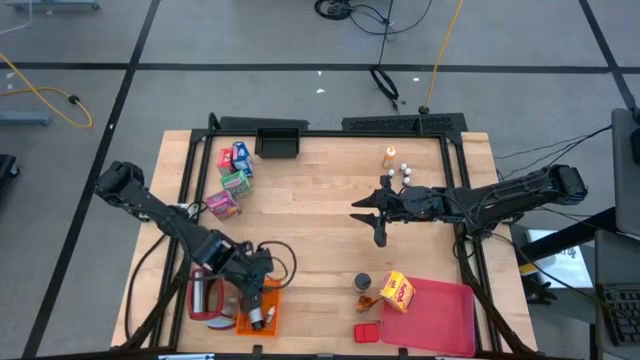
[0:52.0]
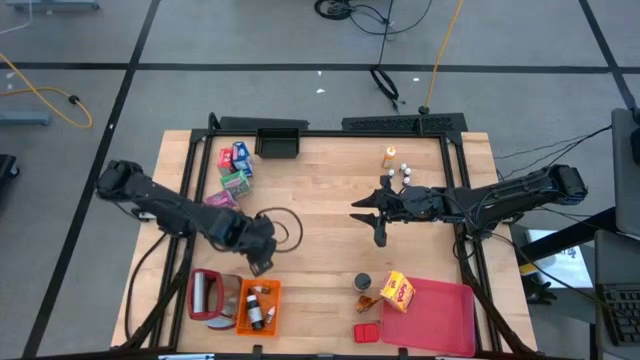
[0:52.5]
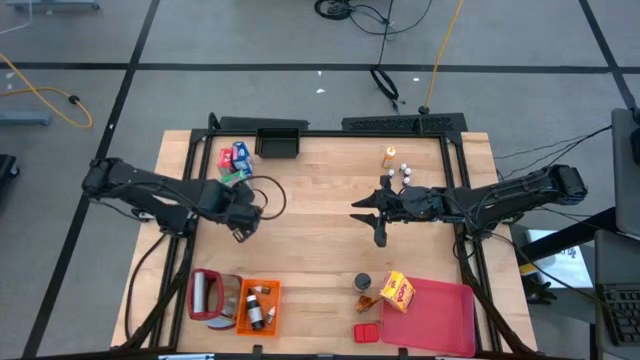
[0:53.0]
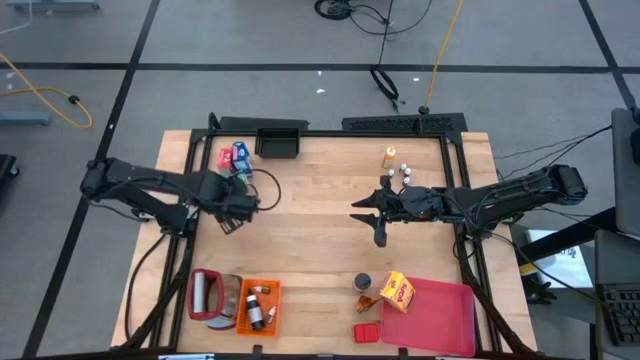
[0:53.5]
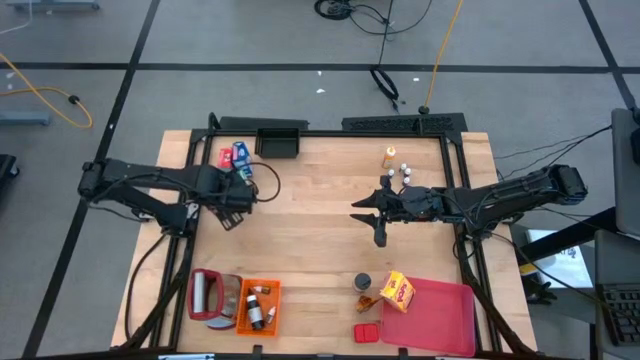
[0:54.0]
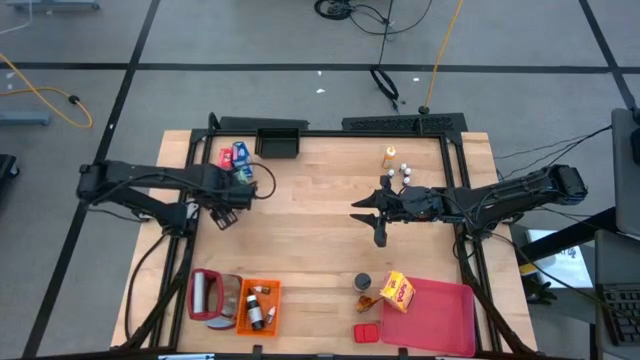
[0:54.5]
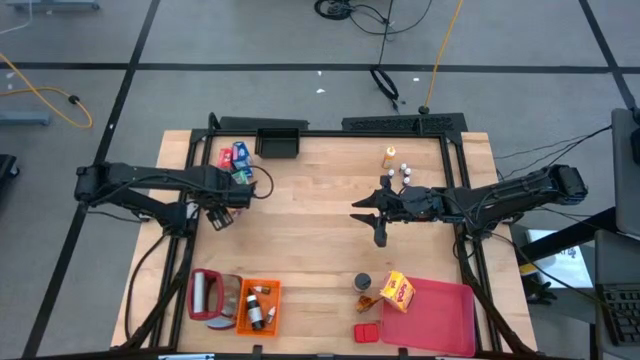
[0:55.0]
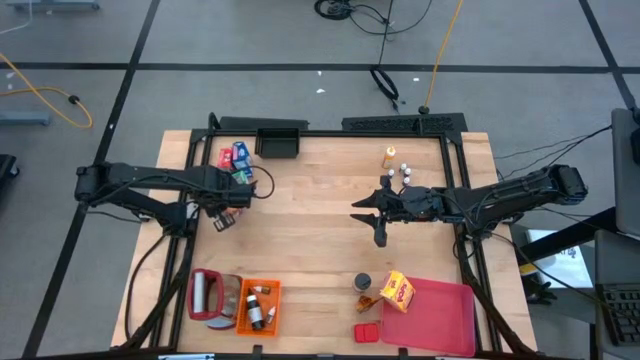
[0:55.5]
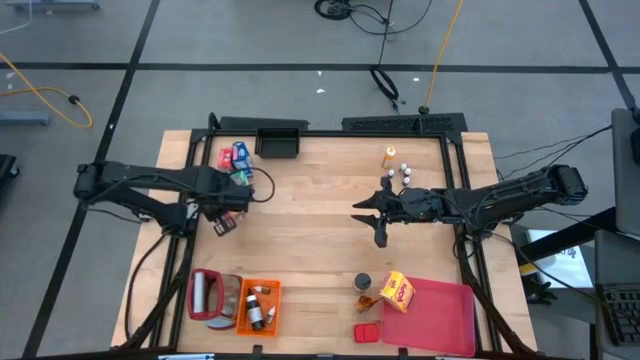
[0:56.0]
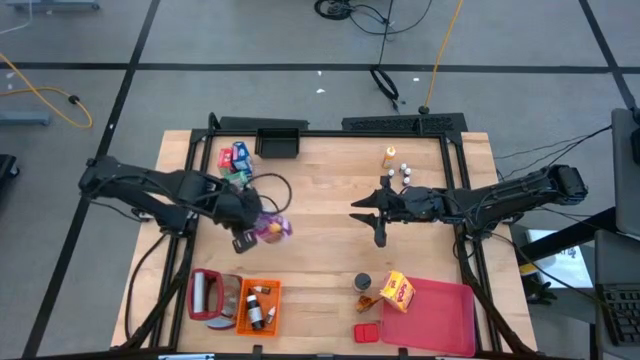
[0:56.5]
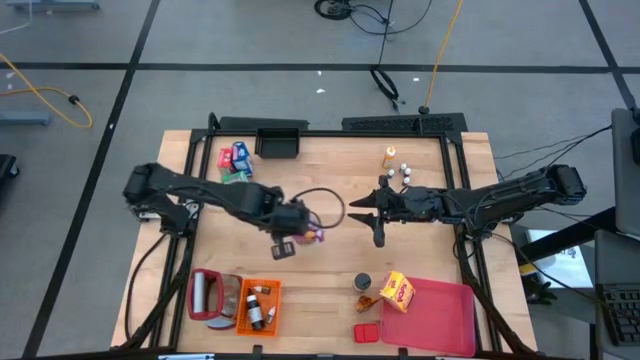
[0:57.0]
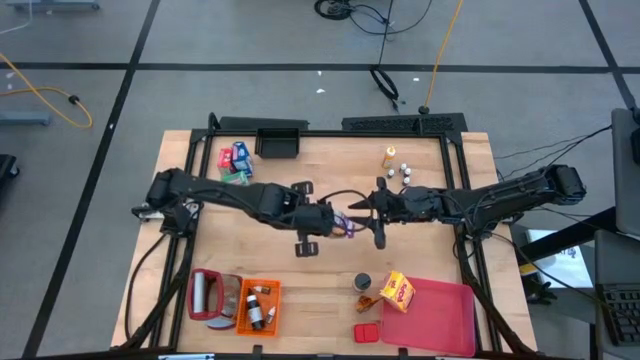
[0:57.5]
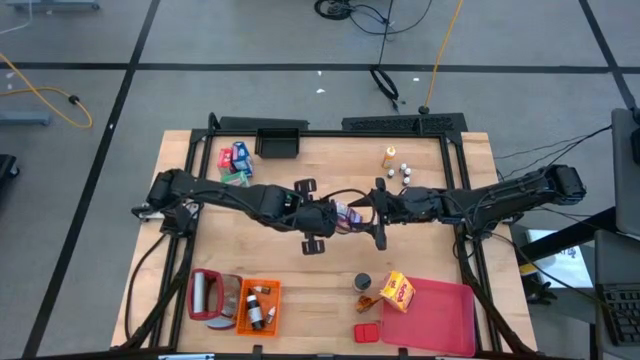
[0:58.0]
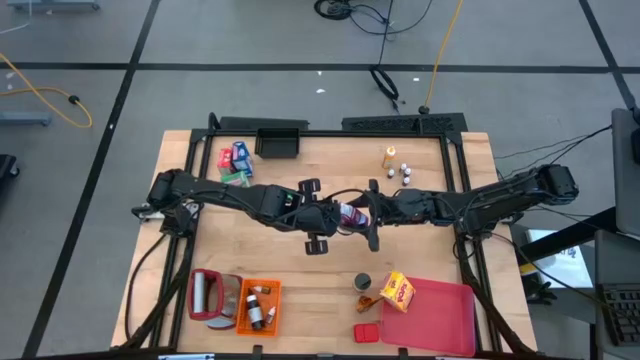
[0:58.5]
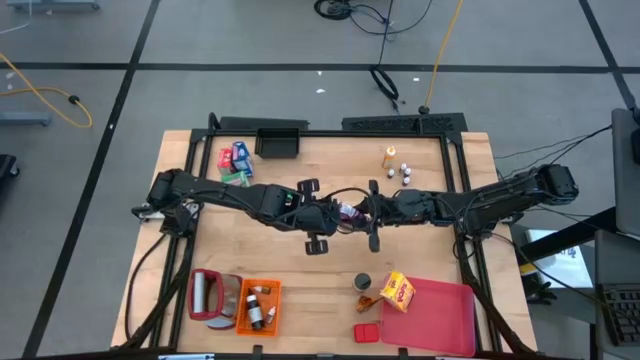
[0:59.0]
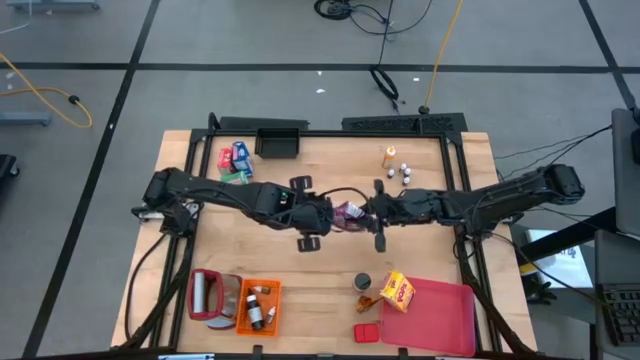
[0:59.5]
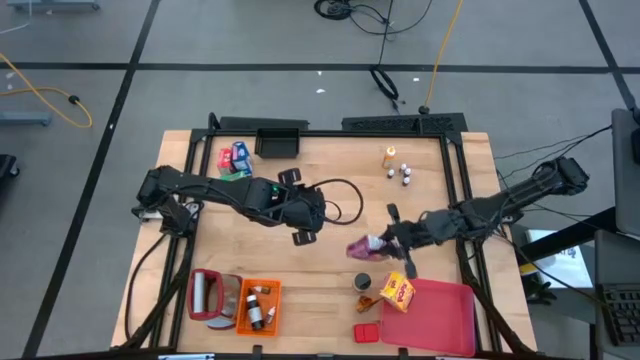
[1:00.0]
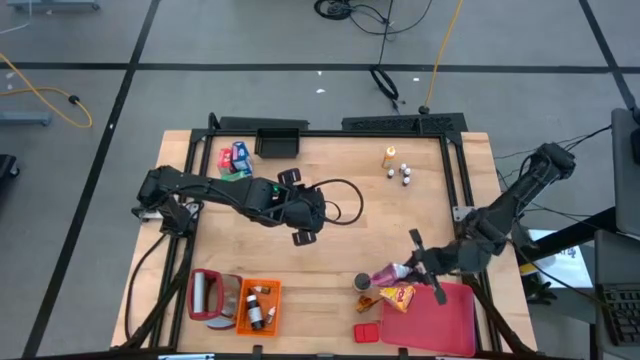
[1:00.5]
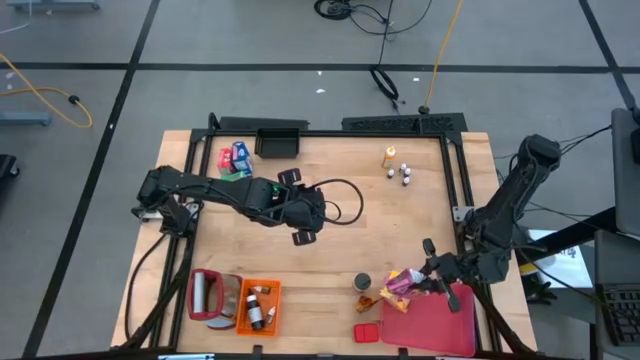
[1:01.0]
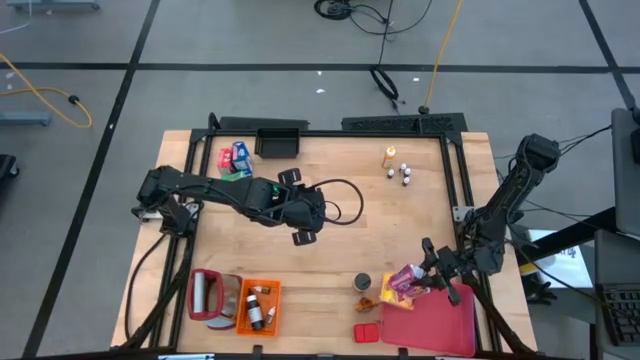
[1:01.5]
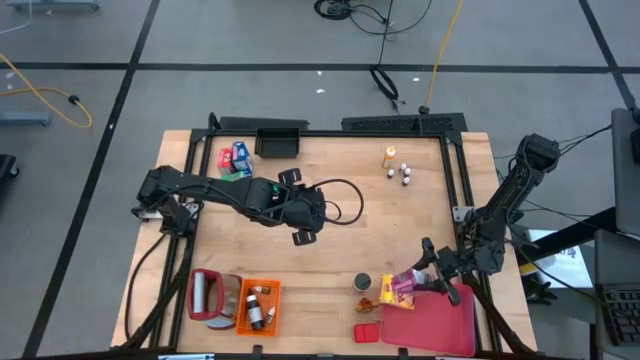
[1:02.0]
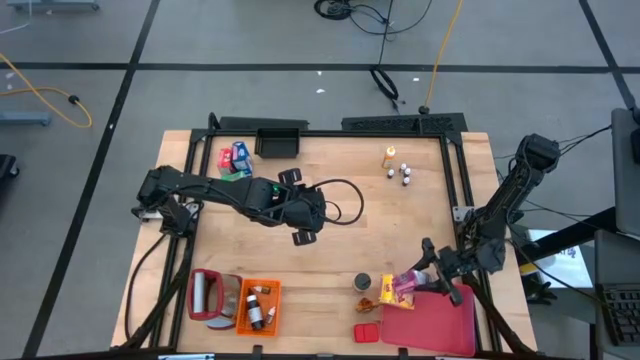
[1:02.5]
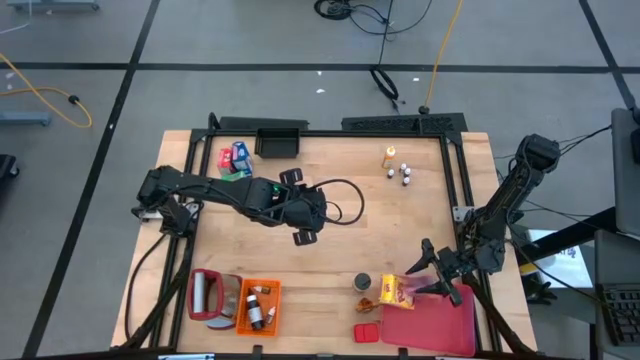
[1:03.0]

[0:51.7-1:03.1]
Task: Pick & Place Kitchen Items
Put the purple cereal box into the red bin

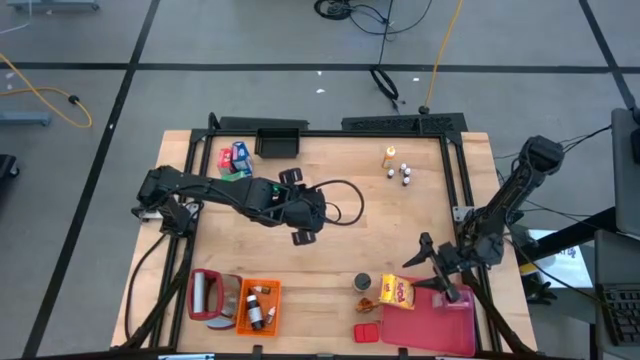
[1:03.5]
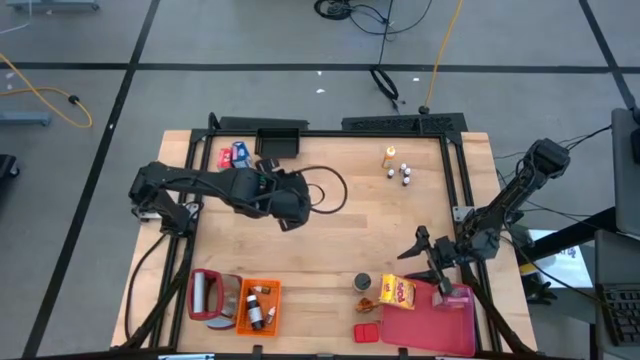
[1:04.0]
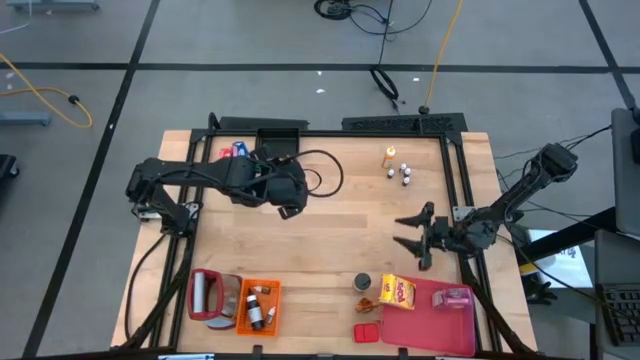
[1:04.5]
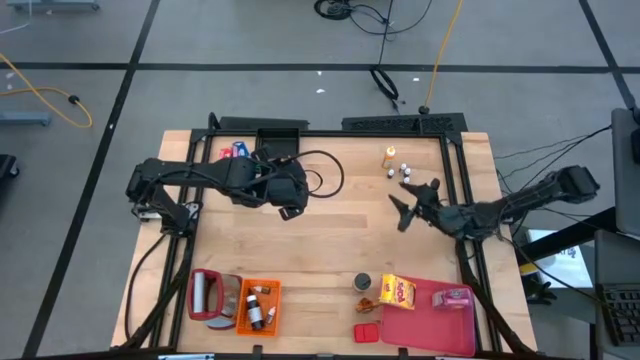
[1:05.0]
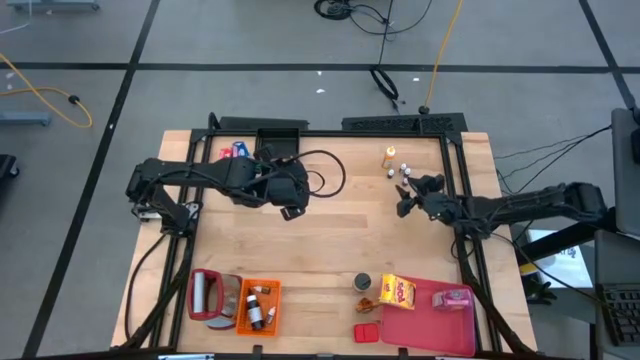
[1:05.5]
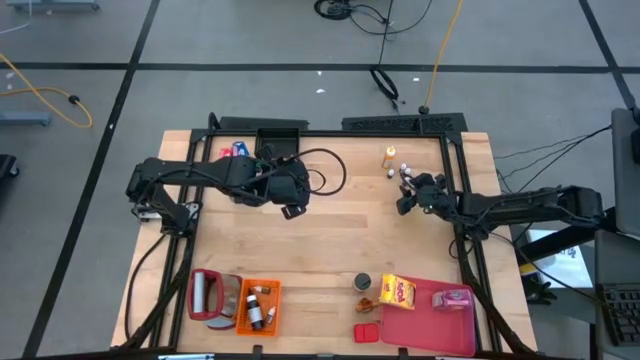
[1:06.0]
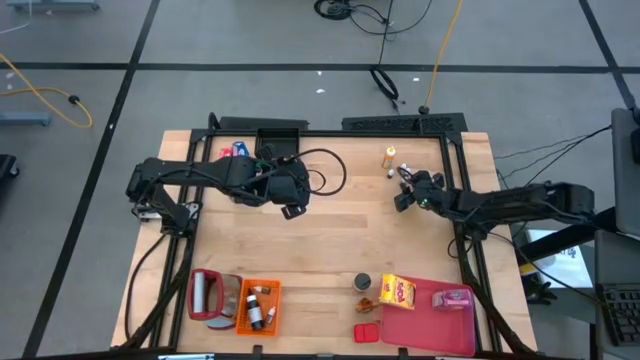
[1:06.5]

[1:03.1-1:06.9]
Put the small red food coloring bottle into the orange bin

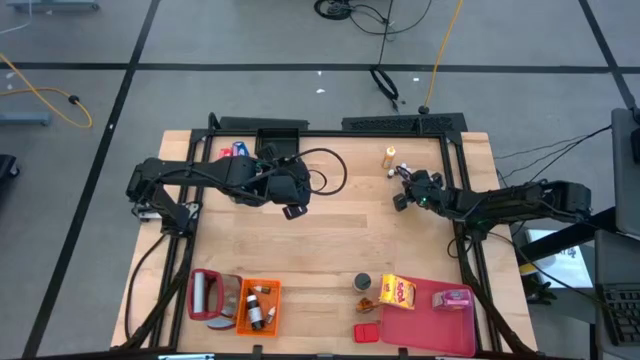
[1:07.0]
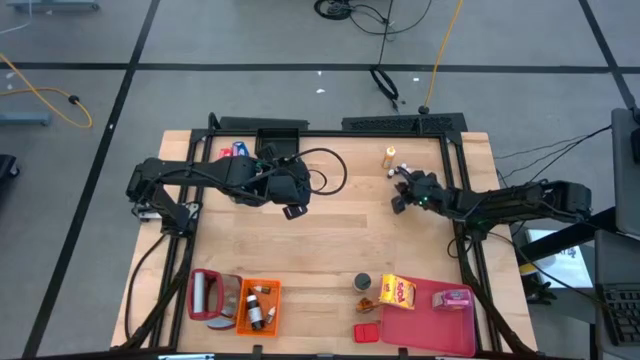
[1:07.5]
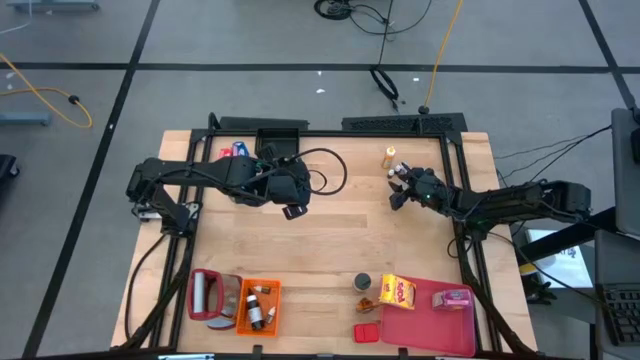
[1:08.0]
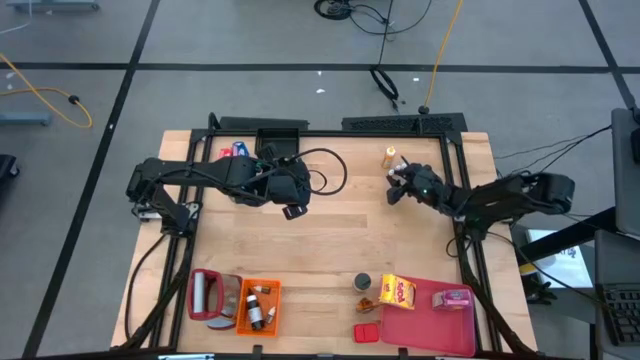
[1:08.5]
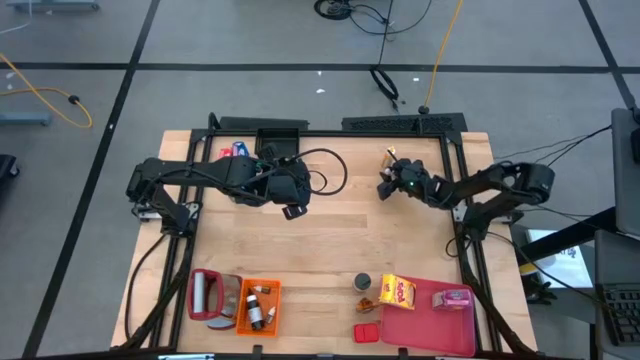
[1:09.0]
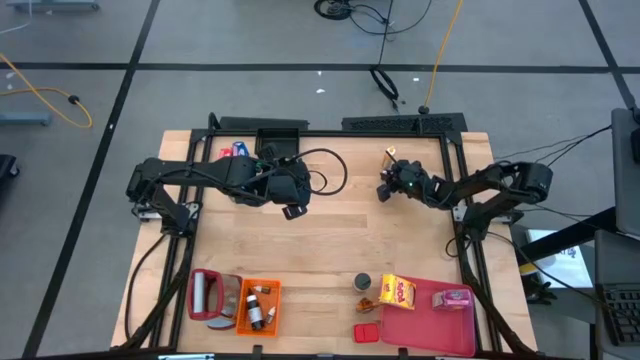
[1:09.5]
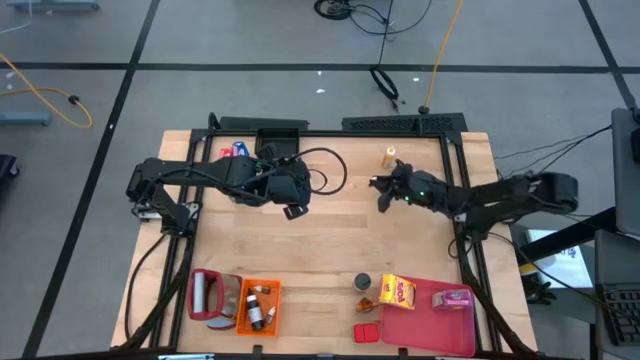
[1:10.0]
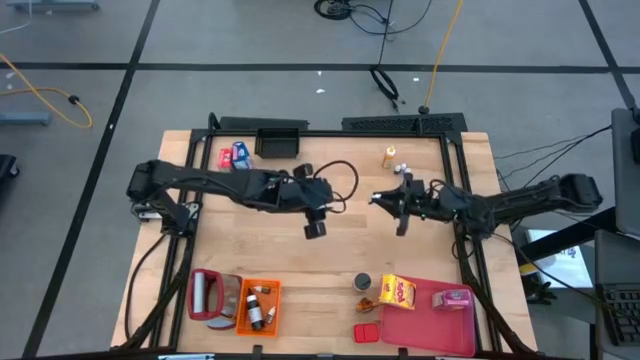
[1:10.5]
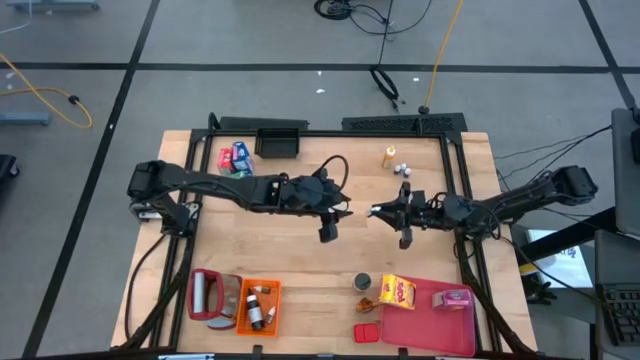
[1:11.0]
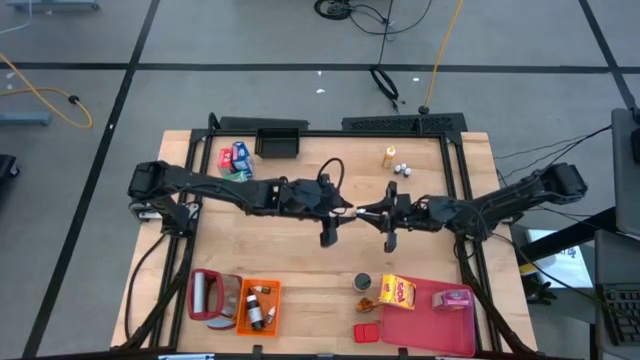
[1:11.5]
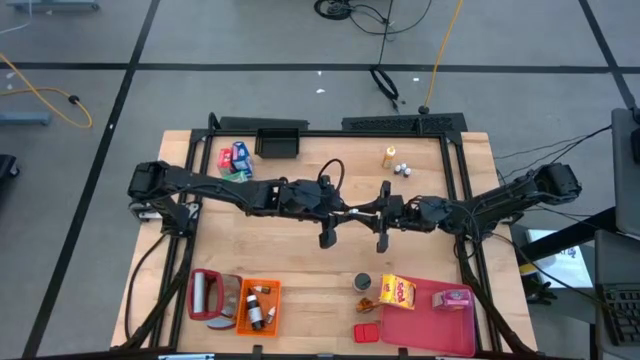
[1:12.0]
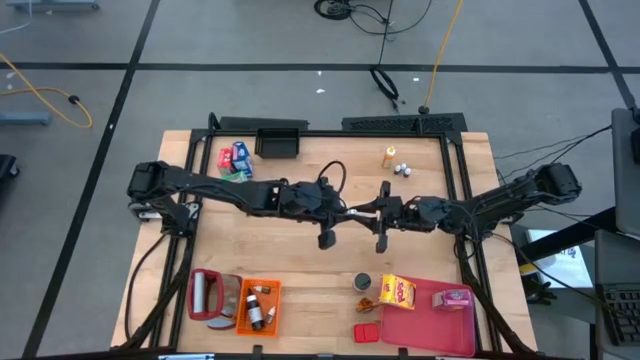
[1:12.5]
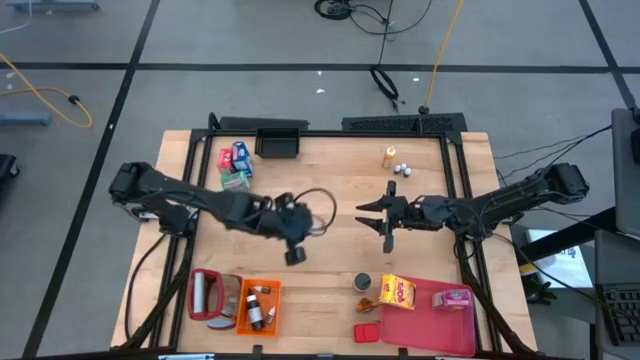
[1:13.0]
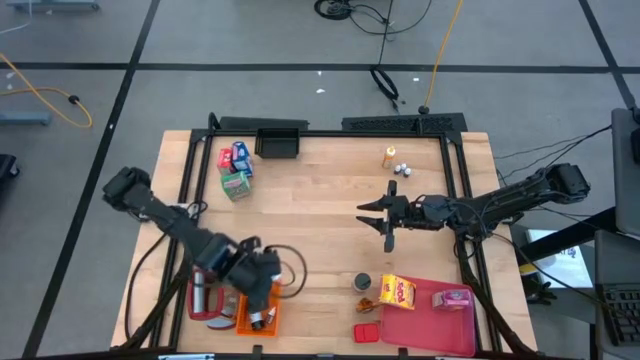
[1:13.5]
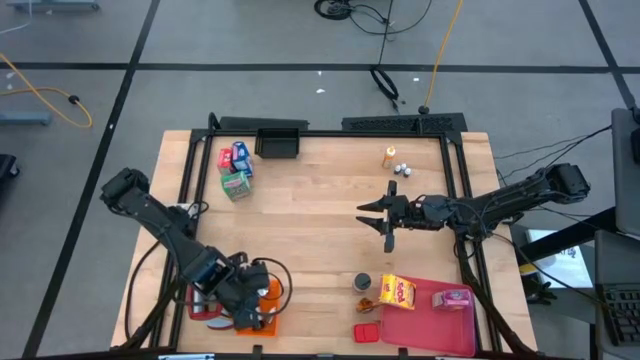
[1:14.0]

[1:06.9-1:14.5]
Put the green coloring bottle into the orange bin
